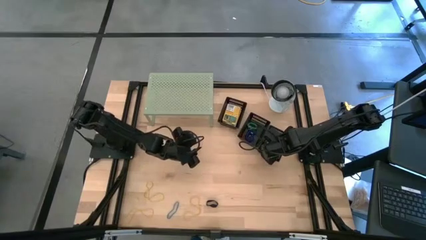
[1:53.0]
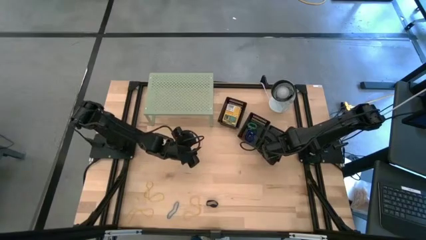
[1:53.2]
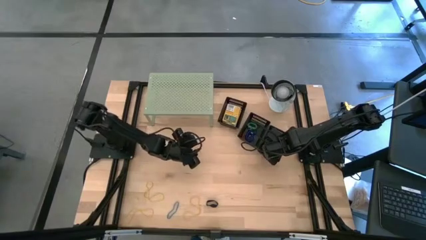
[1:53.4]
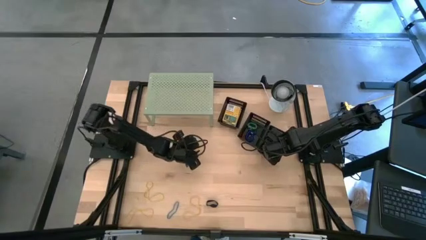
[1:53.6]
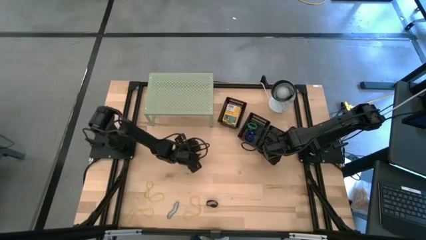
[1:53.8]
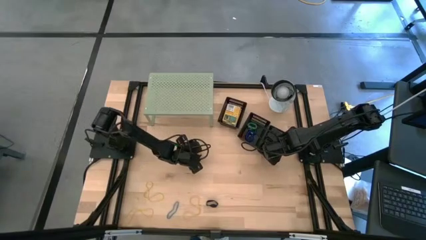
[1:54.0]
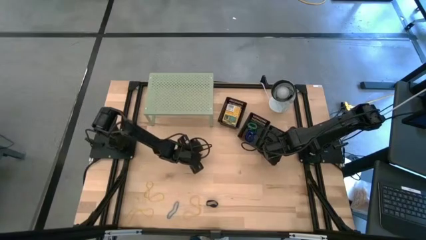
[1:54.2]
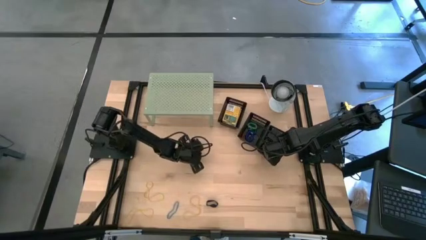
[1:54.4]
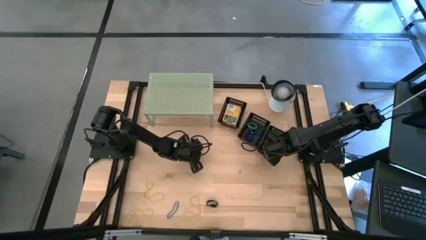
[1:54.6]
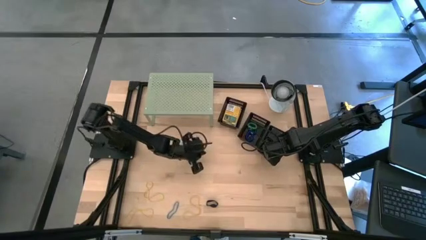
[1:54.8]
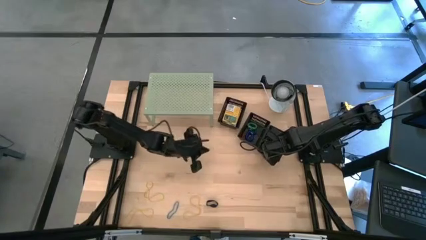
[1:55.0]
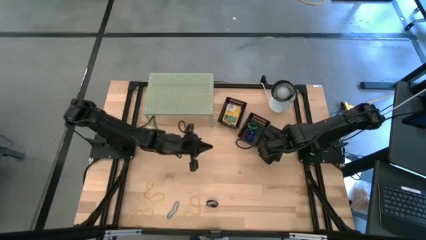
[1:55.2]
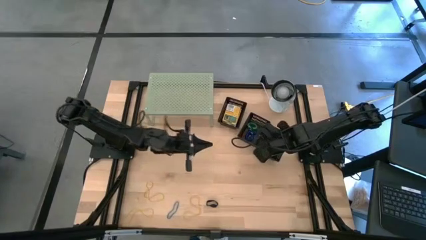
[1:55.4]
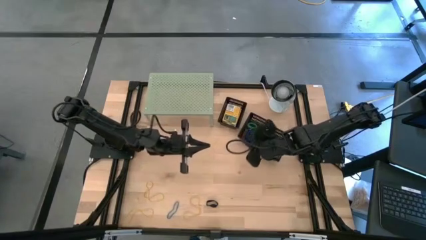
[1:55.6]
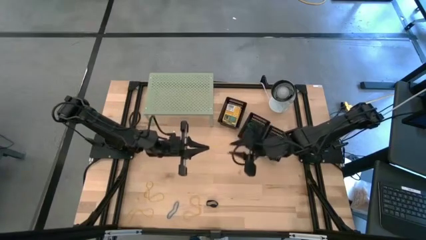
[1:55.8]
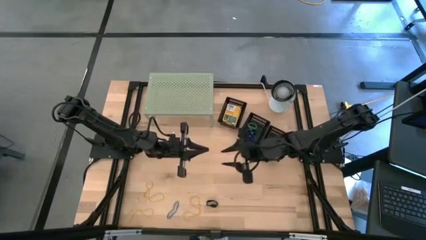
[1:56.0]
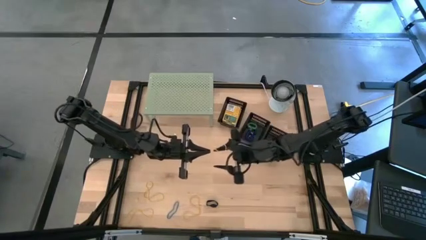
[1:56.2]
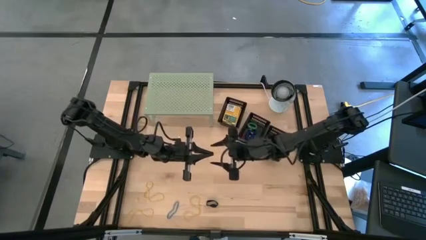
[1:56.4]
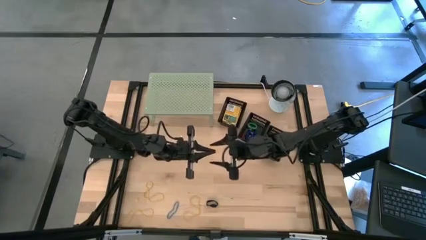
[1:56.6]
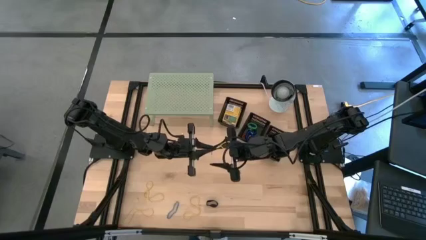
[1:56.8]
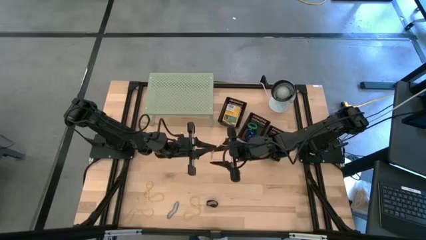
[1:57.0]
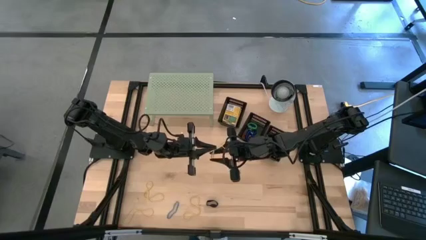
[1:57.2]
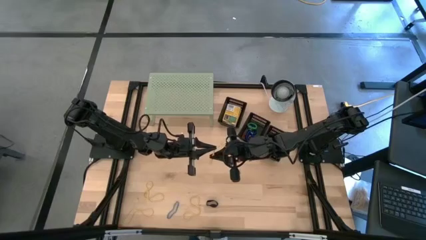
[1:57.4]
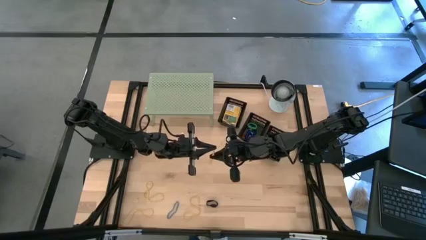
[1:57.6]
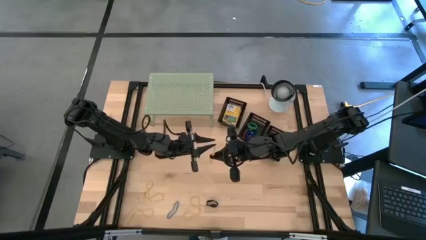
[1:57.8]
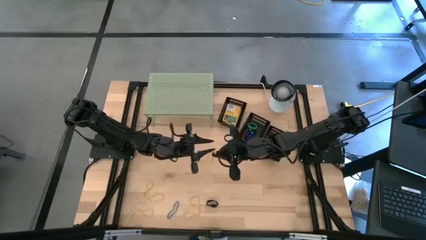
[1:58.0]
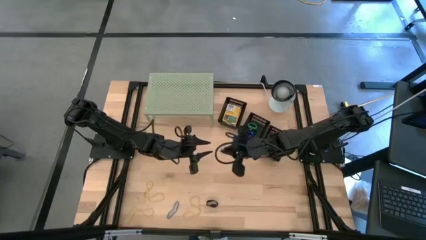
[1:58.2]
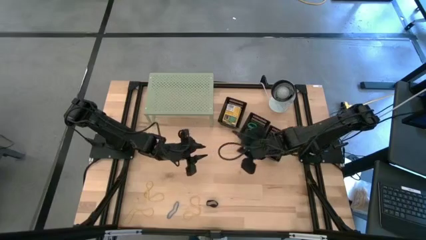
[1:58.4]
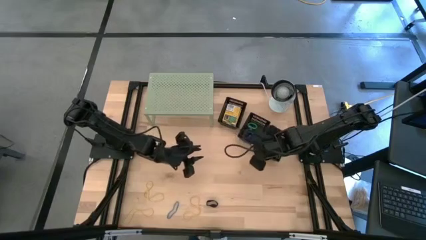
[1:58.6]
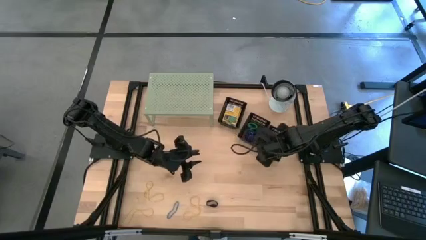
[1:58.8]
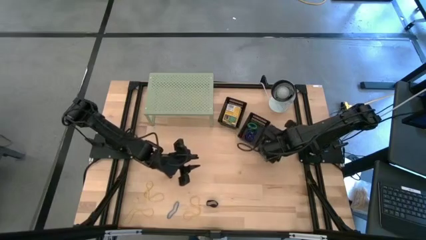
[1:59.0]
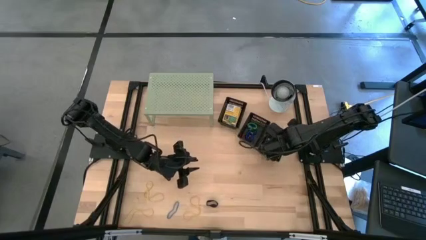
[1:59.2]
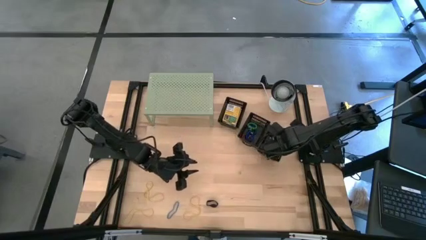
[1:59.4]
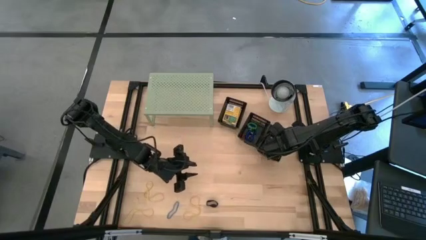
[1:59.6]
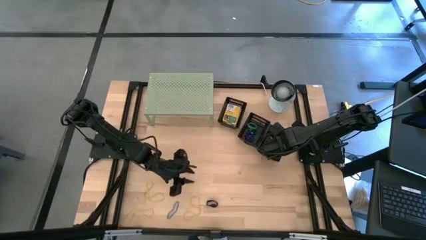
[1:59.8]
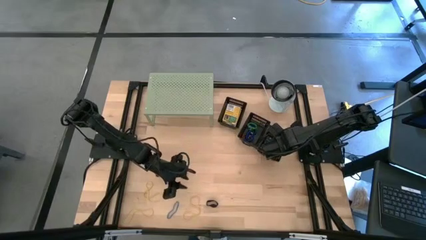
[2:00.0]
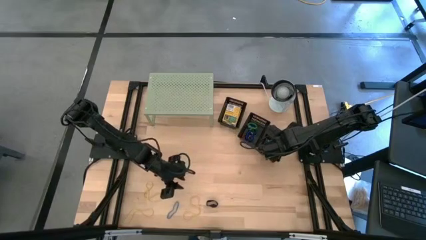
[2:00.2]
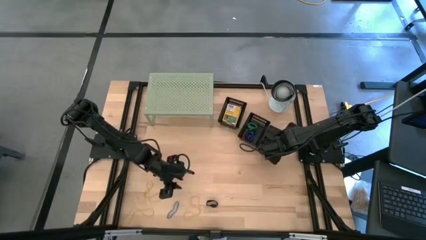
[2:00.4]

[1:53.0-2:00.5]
Task: Pick & Place Office Desk Supplies
Put the yellow rubber band into the bottom black bin

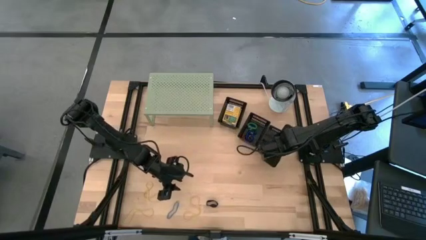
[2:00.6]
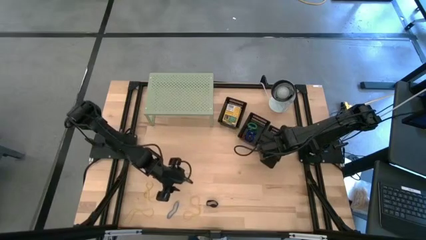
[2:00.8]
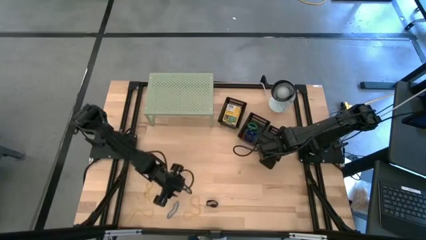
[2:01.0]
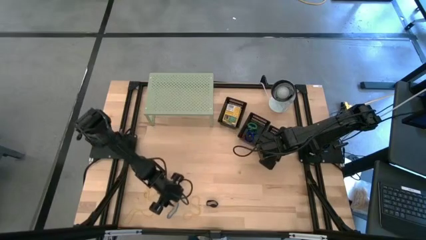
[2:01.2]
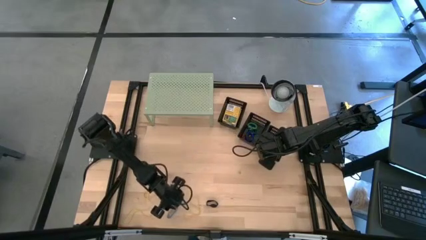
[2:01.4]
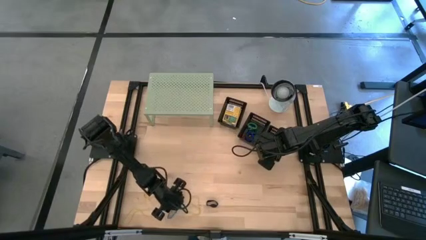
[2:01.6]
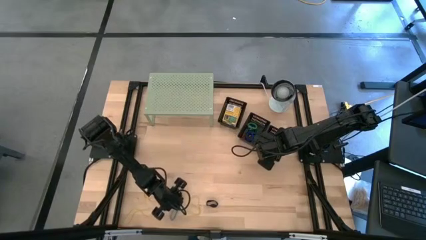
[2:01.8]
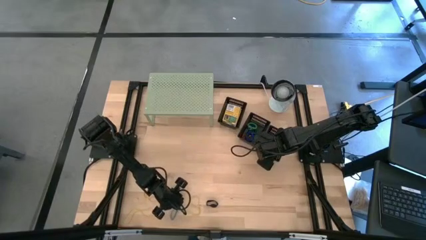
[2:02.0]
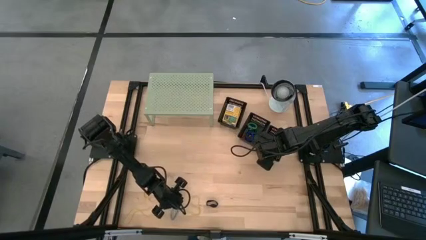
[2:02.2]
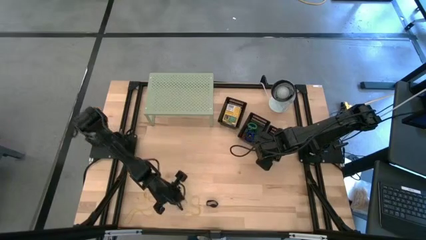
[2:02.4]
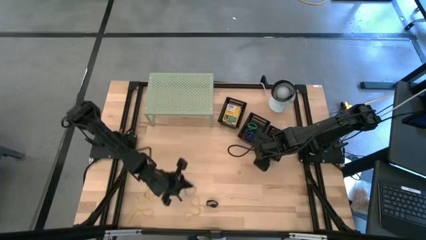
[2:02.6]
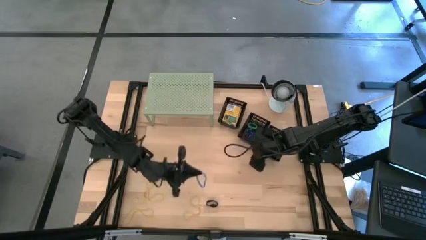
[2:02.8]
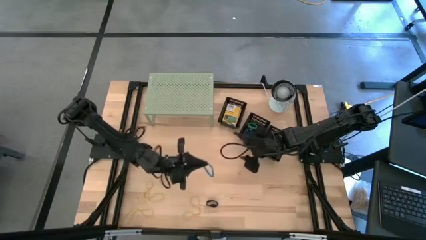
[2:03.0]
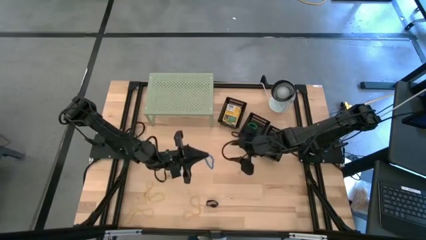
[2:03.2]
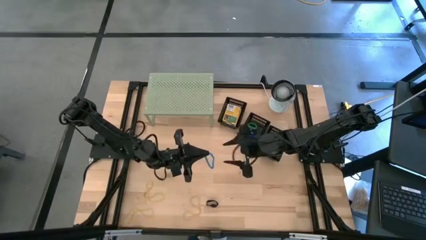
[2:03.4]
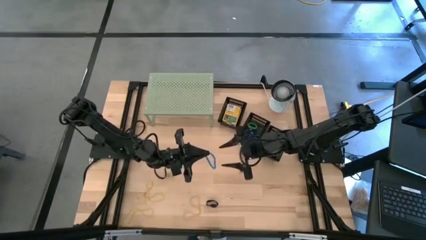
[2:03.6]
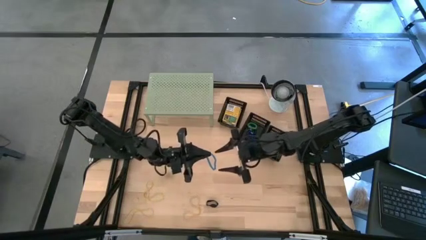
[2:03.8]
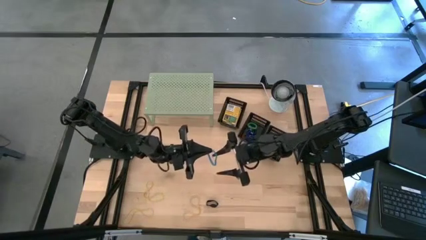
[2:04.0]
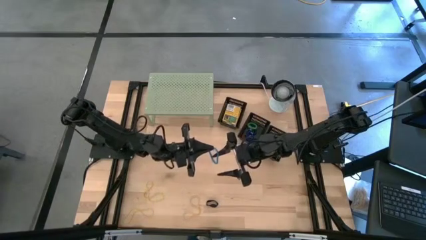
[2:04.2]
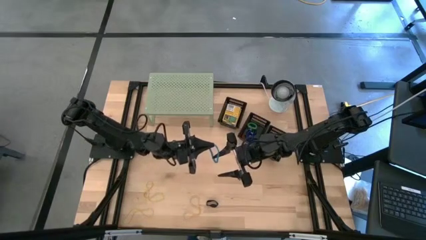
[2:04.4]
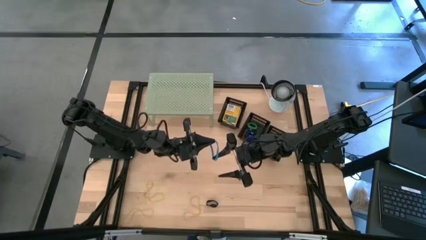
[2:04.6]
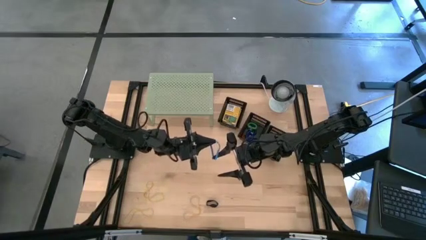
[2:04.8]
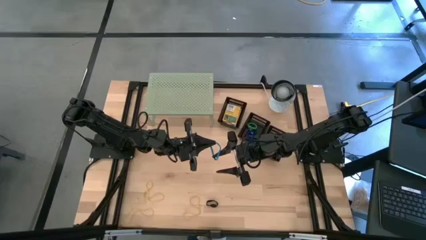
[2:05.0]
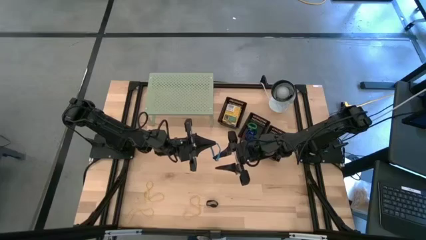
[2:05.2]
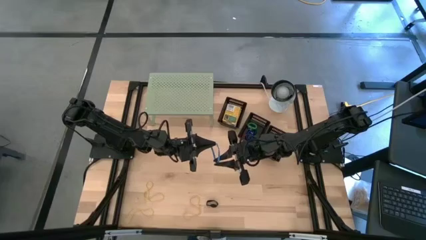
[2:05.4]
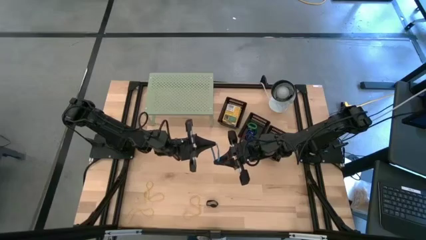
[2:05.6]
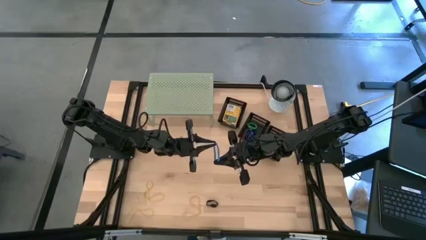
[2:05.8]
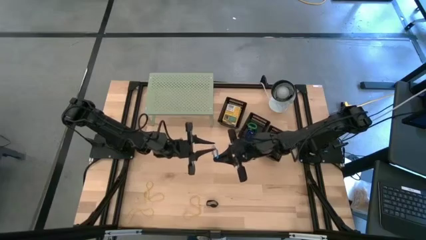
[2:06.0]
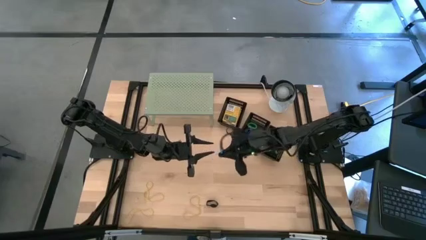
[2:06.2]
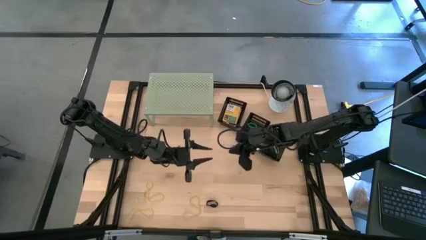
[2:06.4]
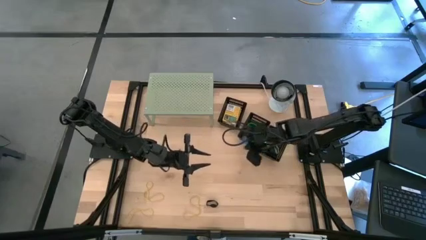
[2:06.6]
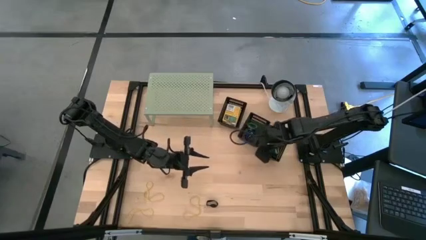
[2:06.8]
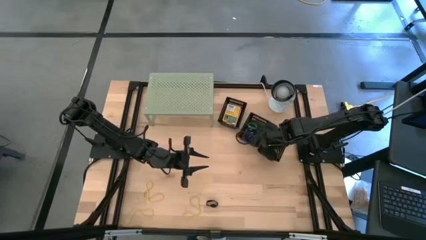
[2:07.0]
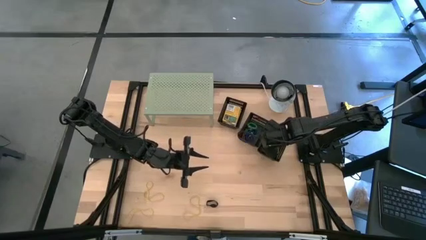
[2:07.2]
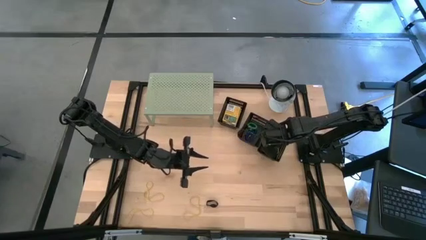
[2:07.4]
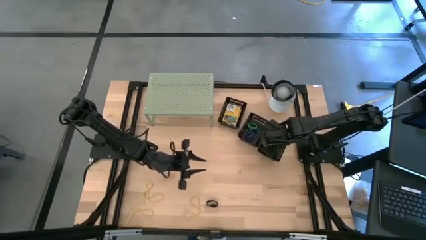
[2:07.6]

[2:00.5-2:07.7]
Put the blue rubber band into the bottom black bin
